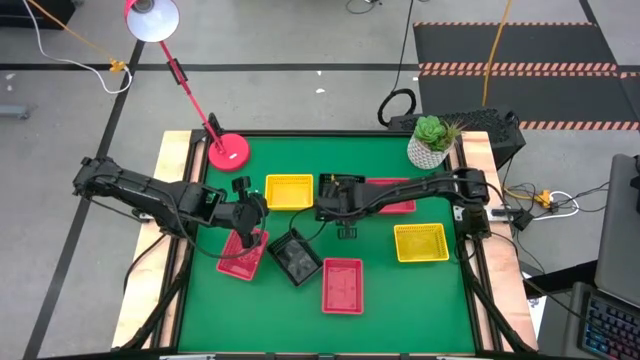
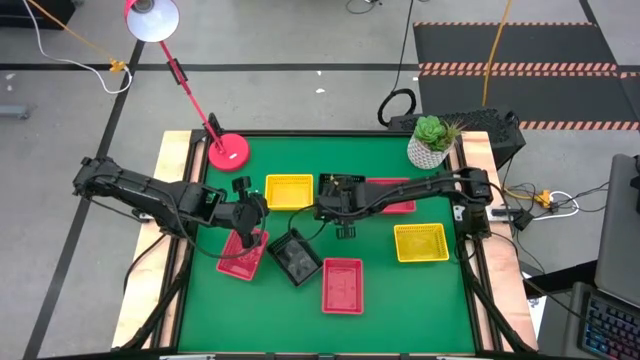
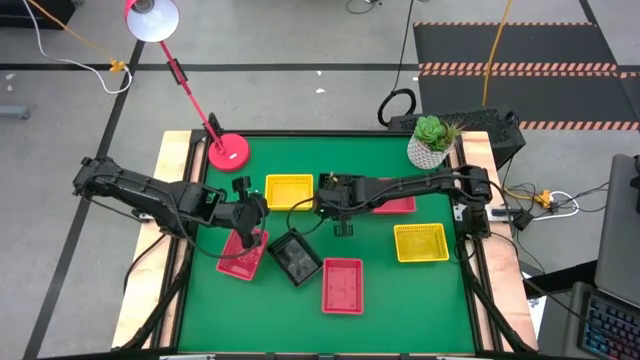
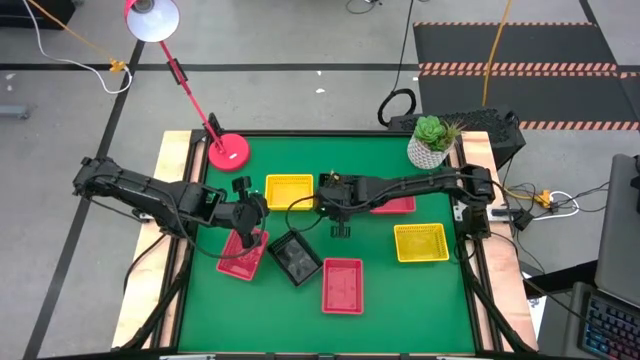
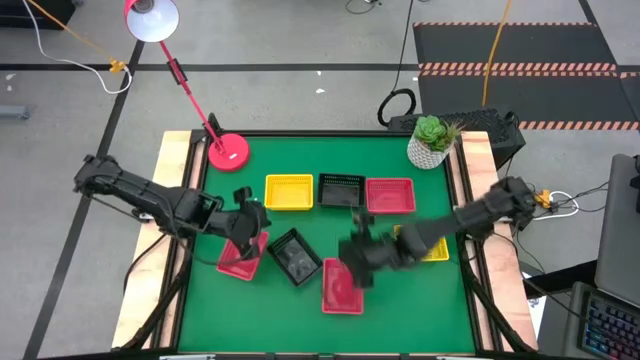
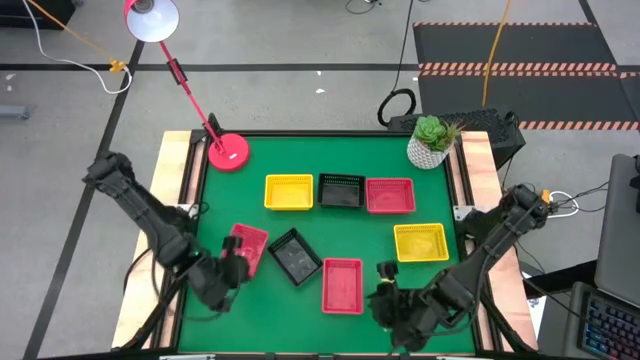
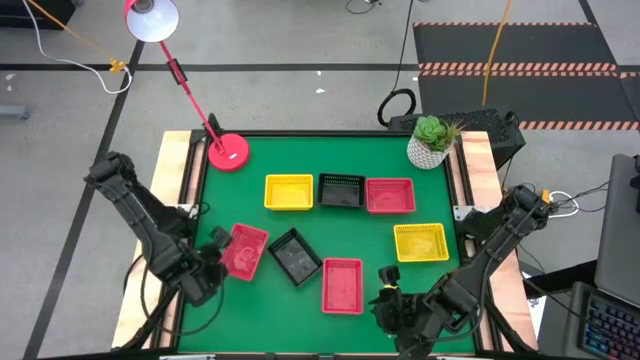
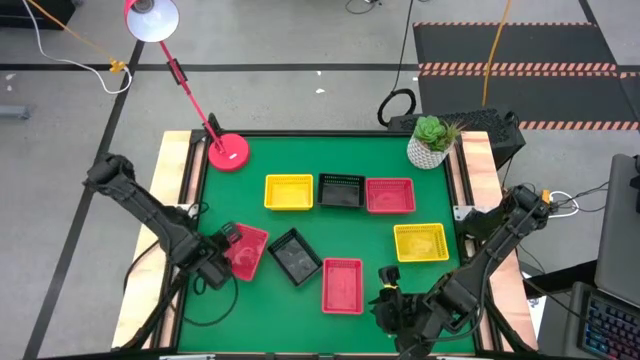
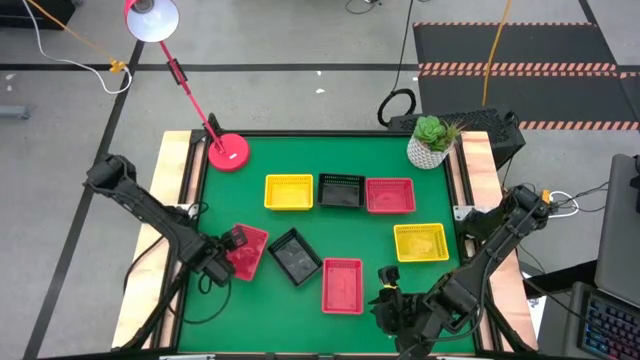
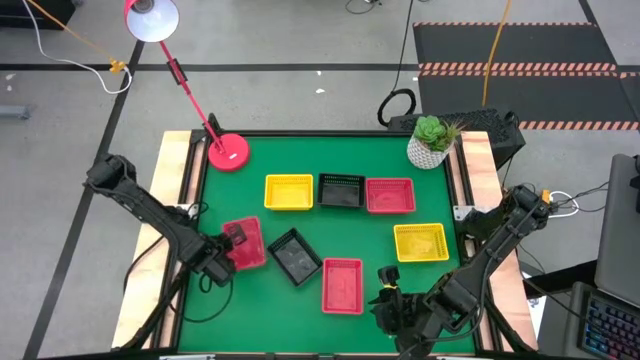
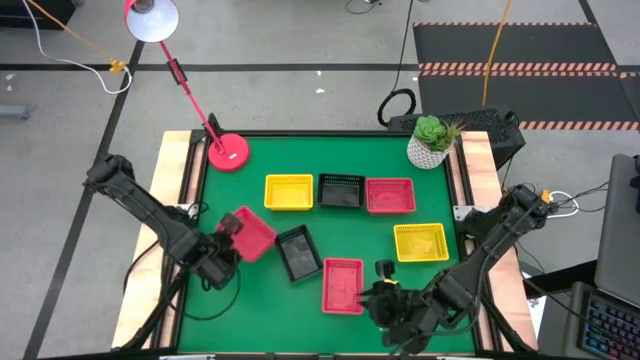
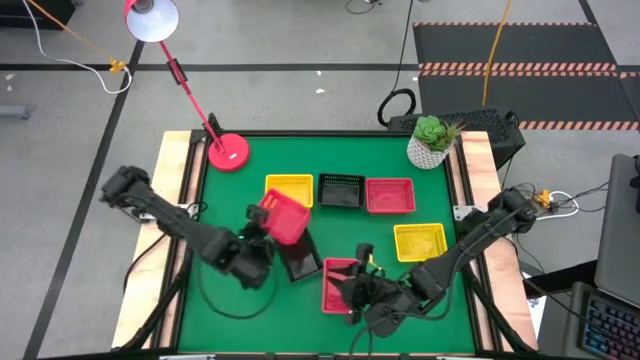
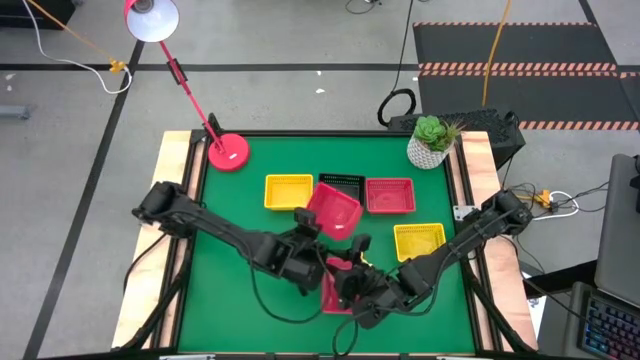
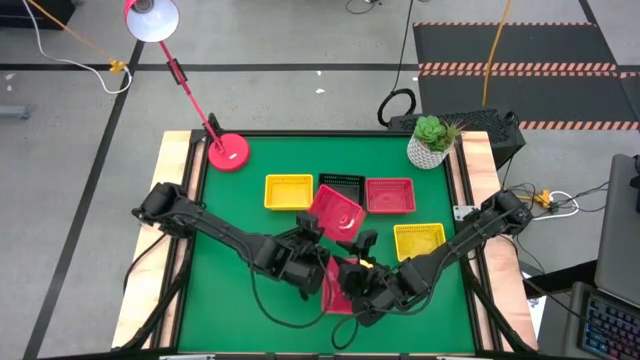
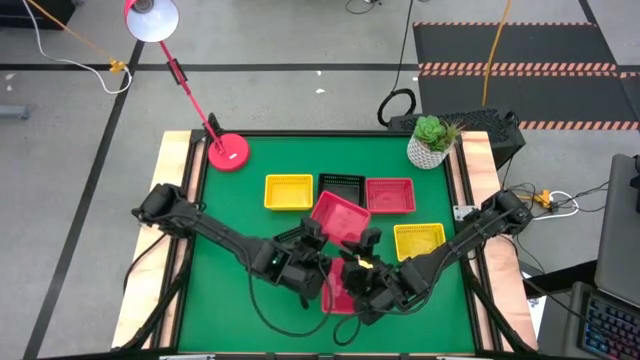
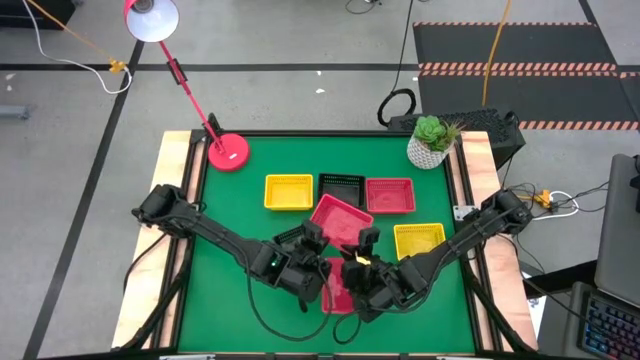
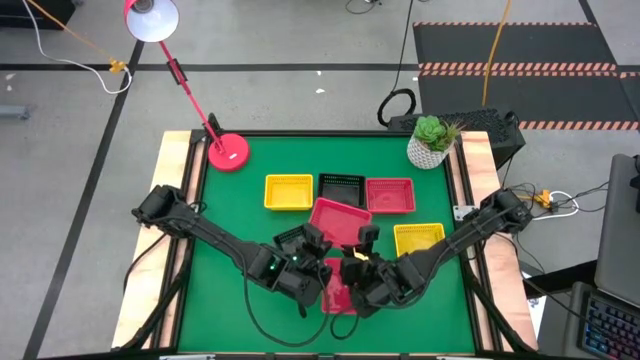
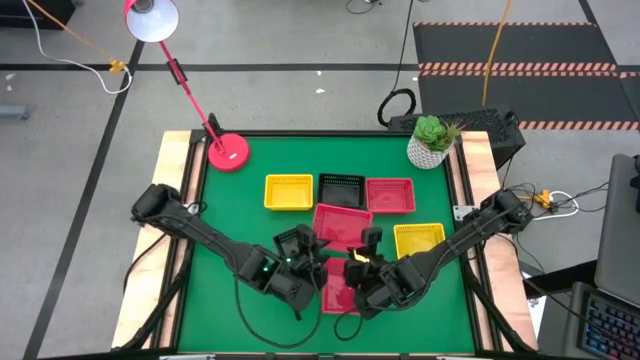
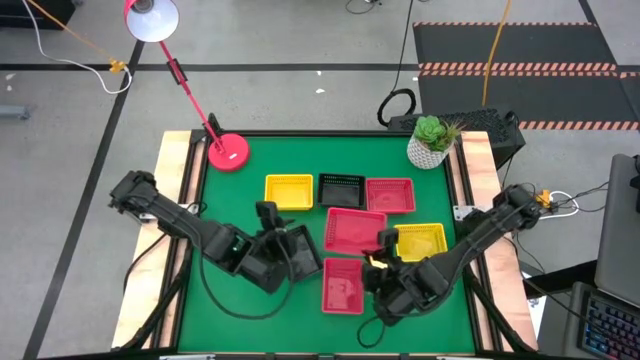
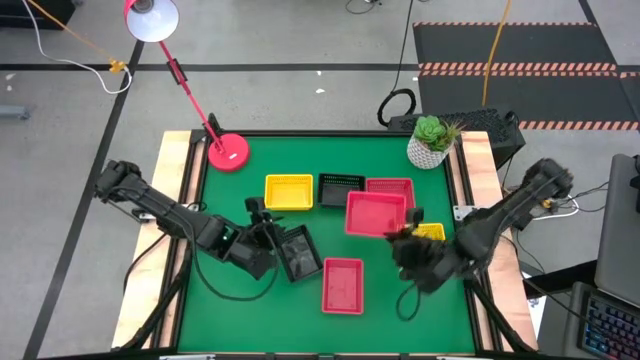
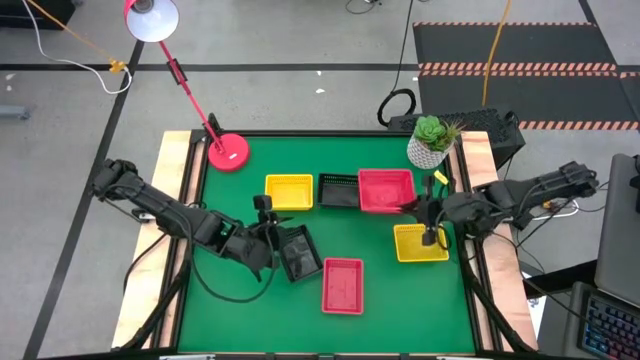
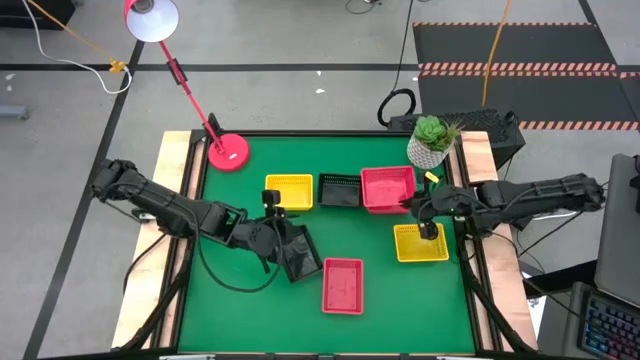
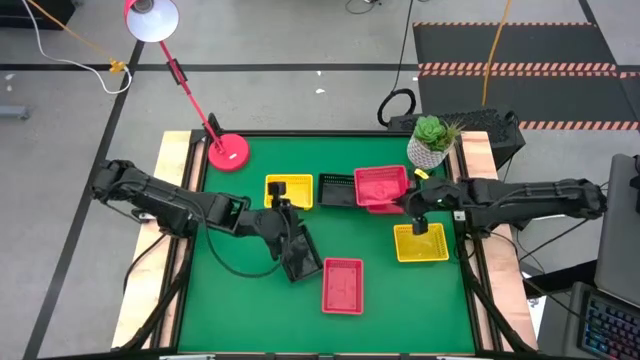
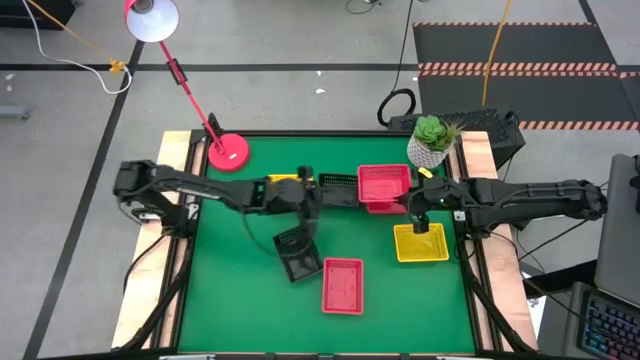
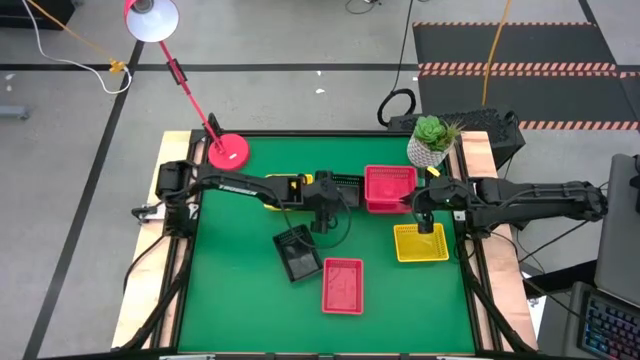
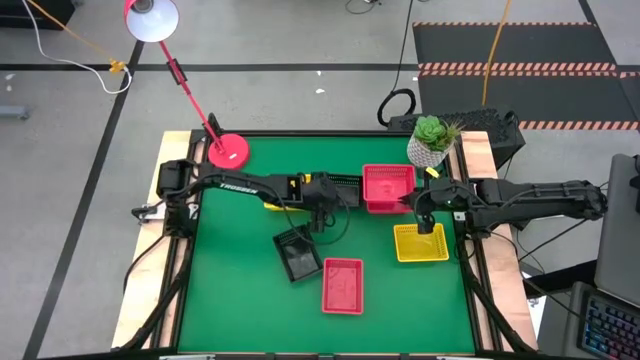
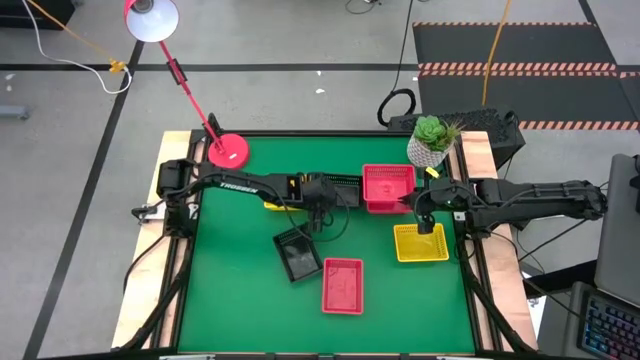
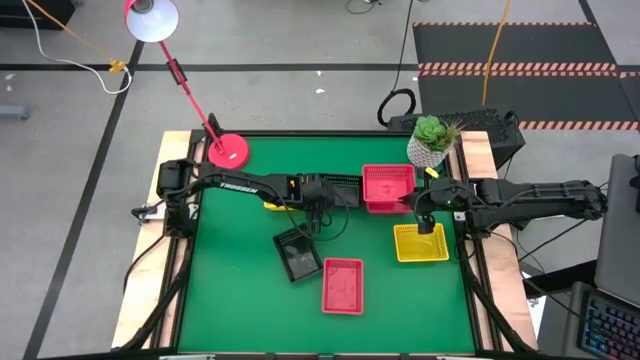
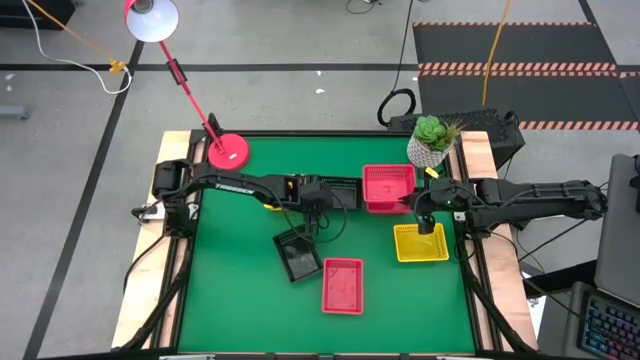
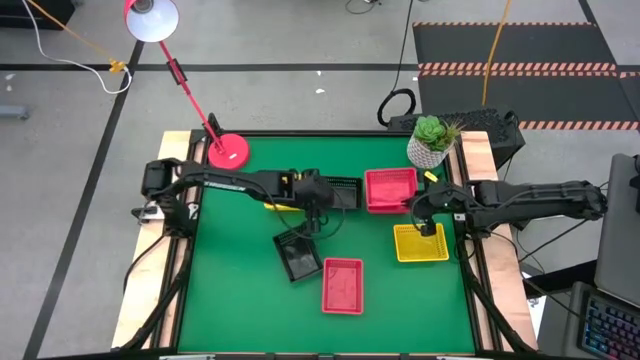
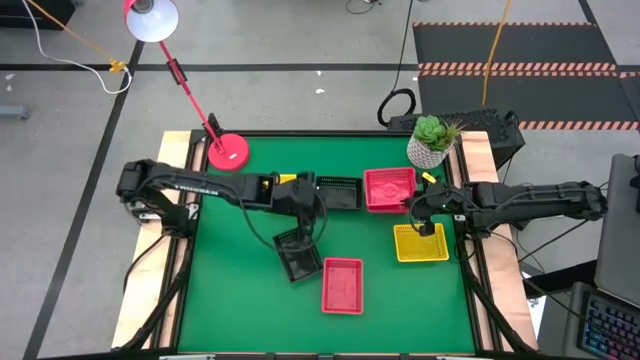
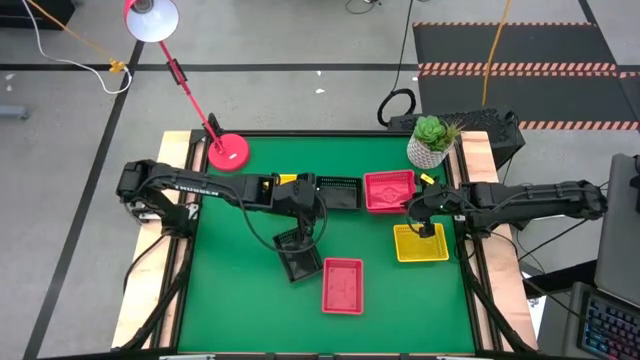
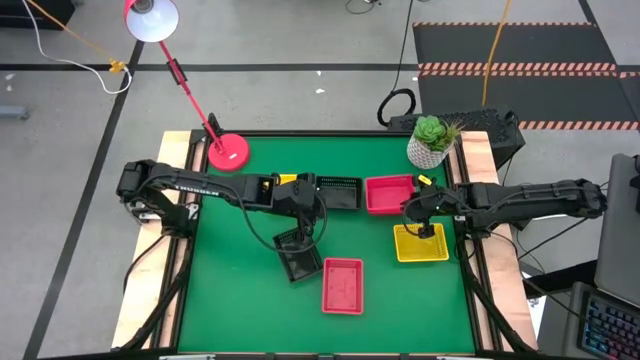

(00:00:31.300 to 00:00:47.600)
Stack the bottom left red bin on top of the the top right red bin

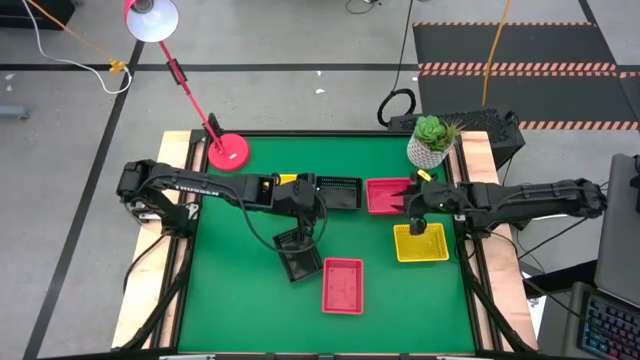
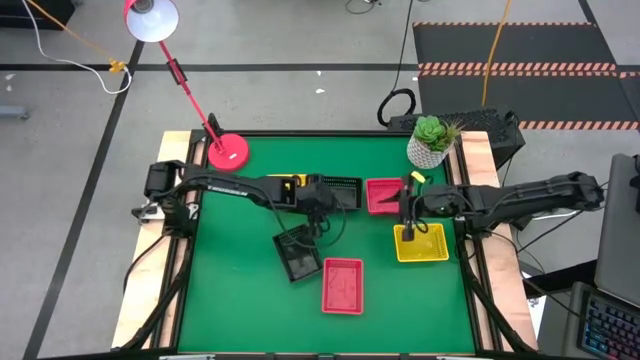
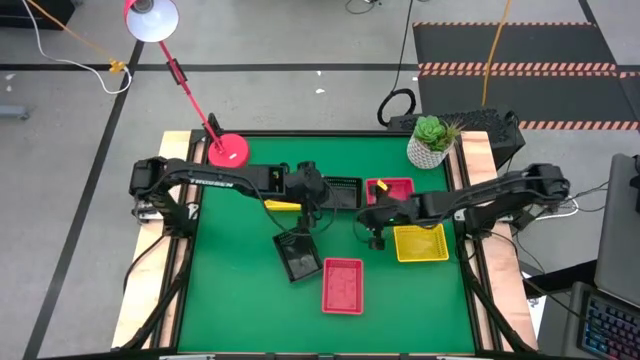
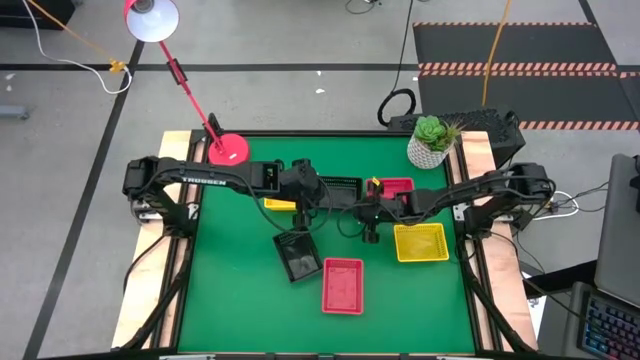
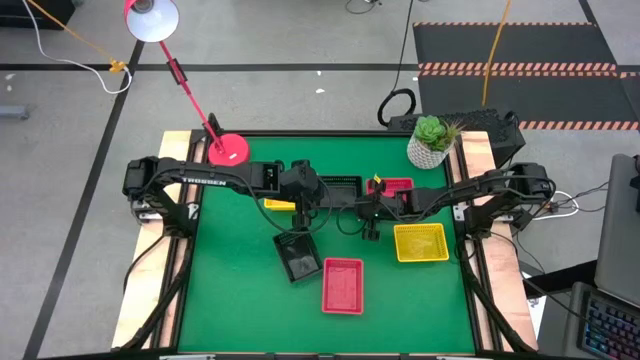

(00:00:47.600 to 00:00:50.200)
Adjust the top black bin
